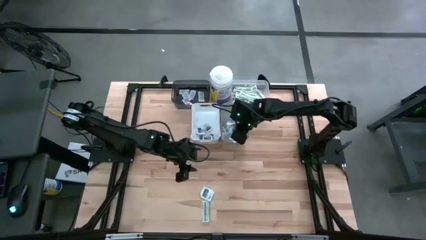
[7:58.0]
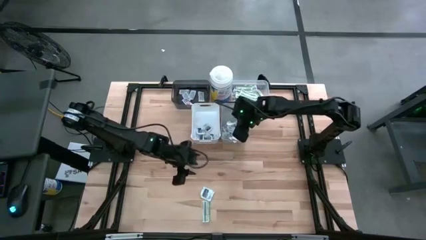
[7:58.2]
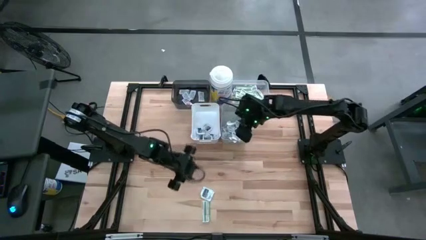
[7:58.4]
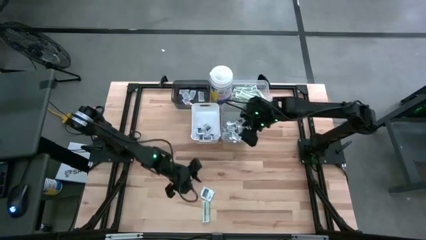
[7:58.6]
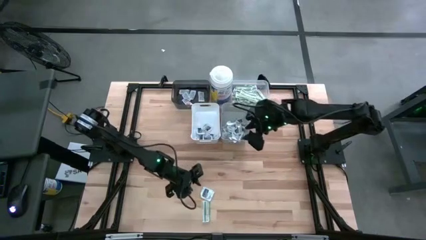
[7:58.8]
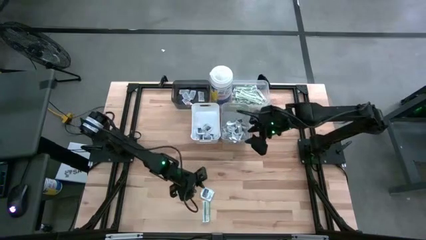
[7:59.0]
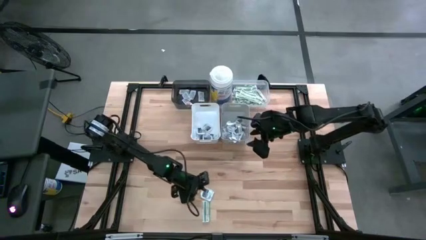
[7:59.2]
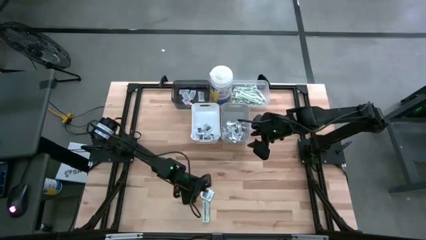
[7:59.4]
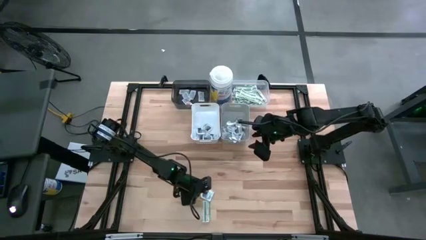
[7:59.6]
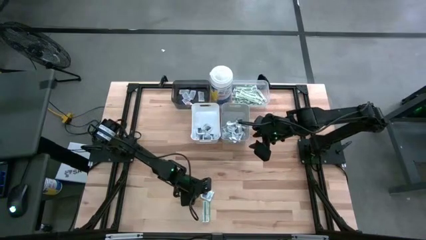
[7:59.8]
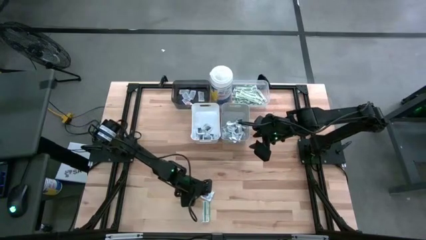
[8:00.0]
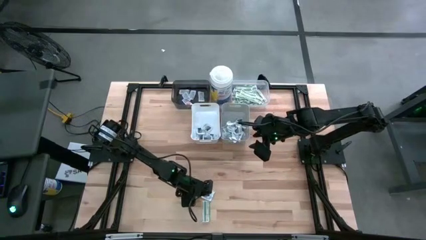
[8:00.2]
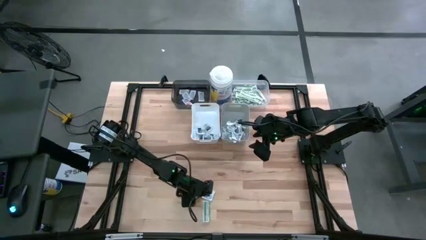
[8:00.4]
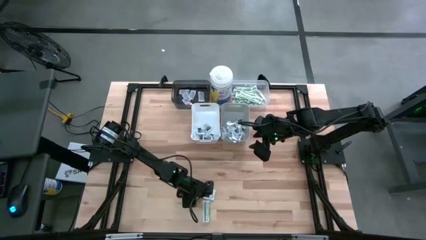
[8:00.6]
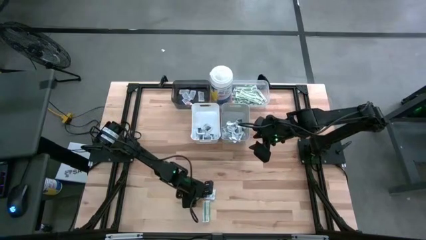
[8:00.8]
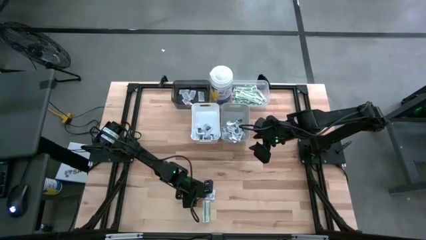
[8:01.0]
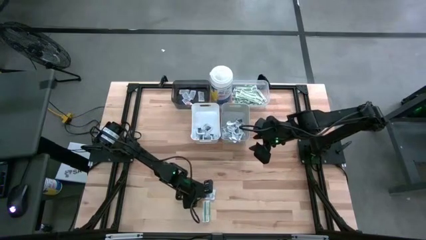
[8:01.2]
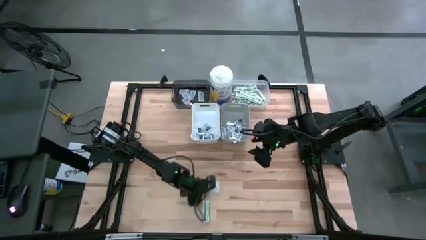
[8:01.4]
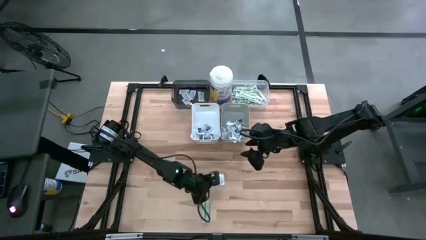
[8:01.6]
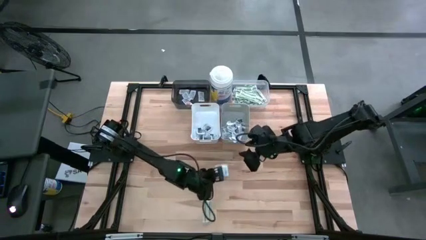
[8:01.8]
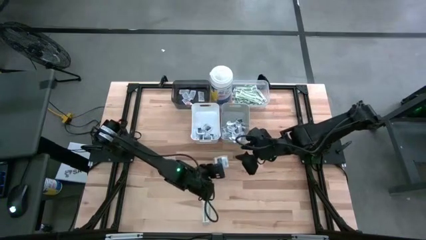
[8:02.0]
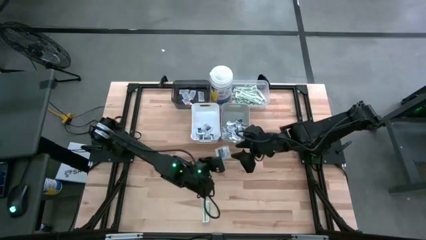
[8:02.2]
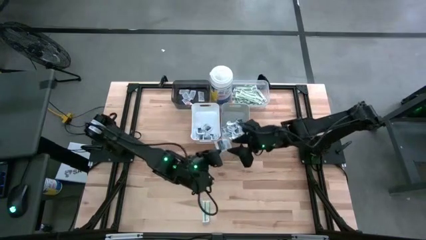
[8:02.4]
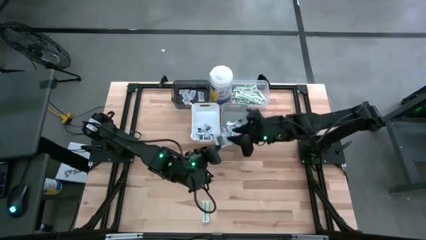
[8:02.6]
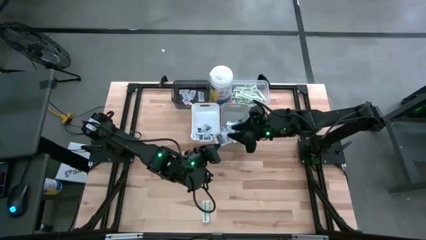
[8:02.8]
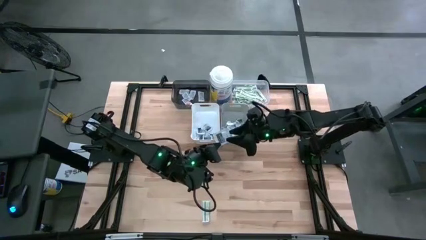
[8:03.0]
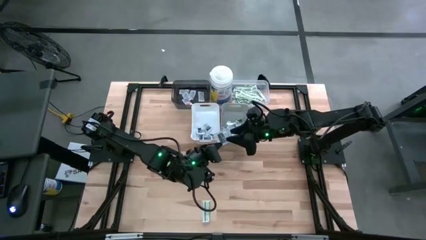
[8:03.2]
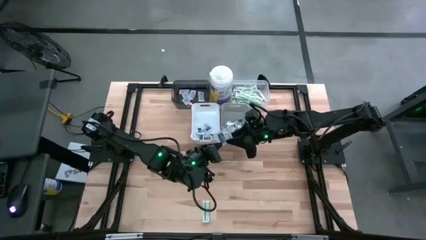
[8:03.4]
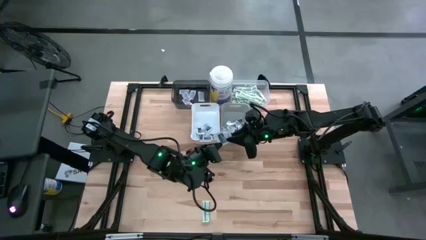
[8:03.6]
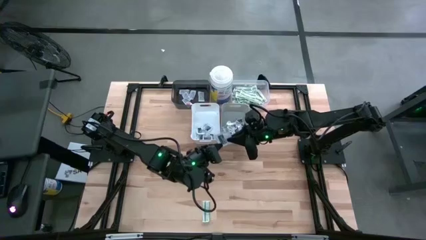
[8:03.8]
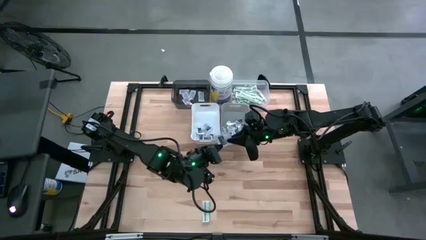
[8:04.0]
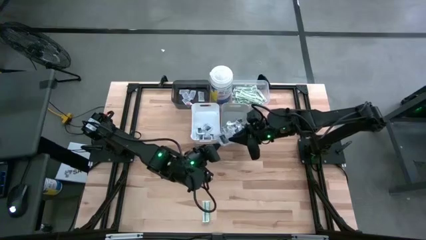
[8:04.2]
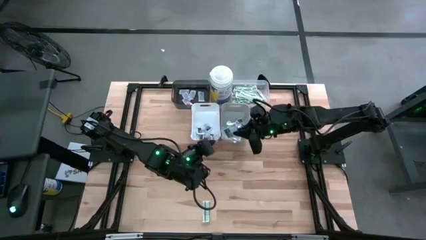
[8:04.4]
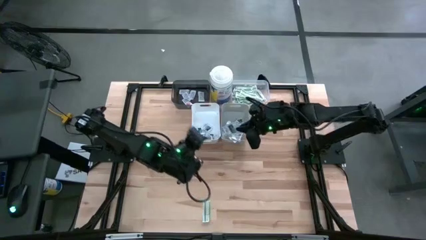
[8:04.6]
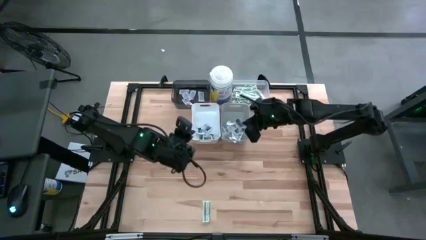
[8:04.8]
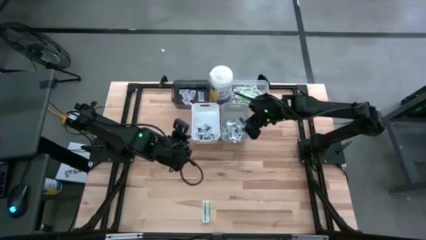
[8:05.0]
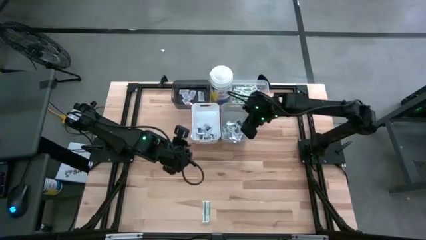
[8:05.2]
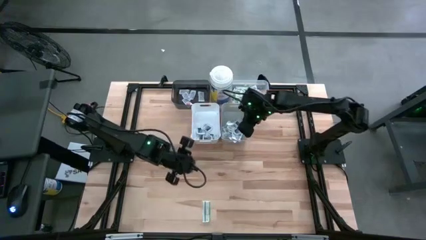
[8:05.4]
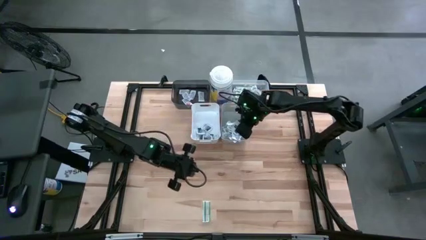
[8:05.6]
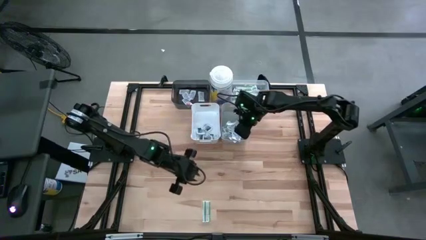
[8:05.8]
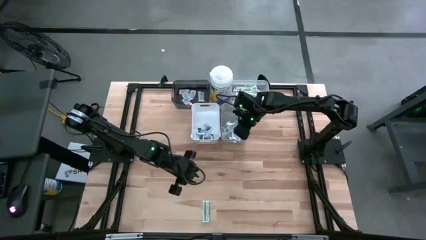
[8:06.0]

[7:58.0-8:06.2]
Task: Pick & Place First Aid Supplies
Put the wipe into the gray bin

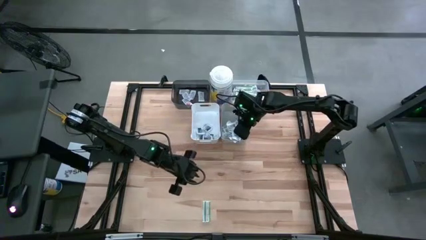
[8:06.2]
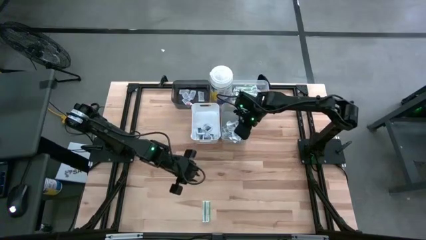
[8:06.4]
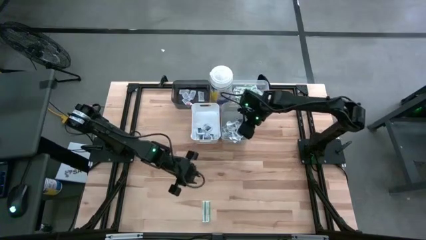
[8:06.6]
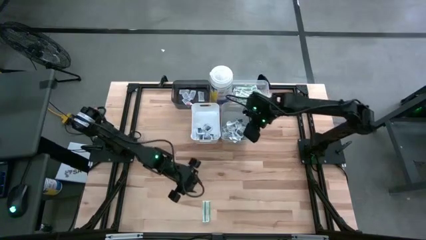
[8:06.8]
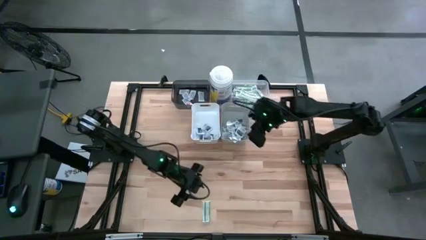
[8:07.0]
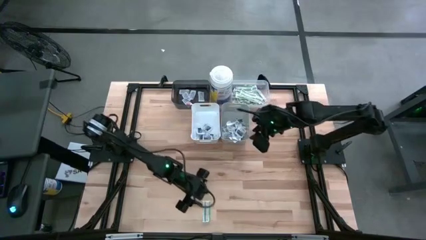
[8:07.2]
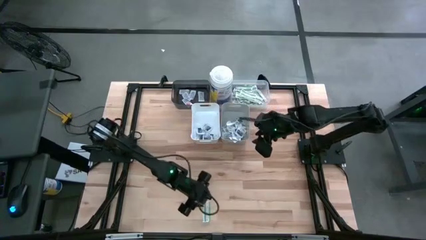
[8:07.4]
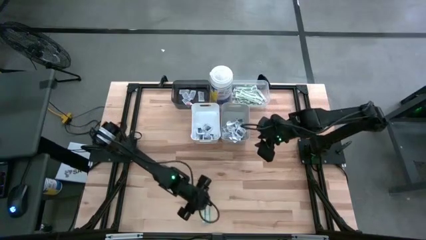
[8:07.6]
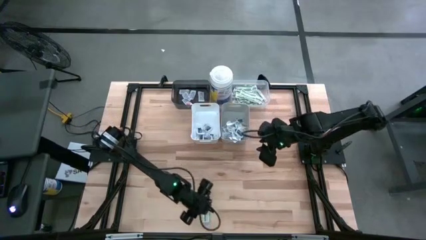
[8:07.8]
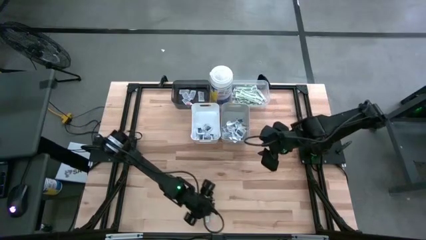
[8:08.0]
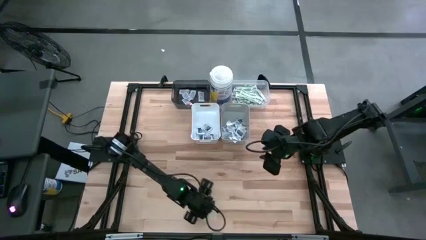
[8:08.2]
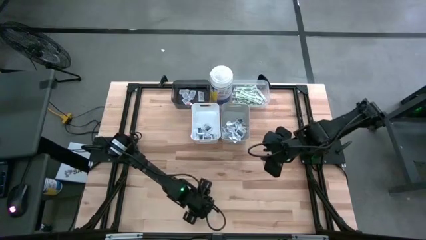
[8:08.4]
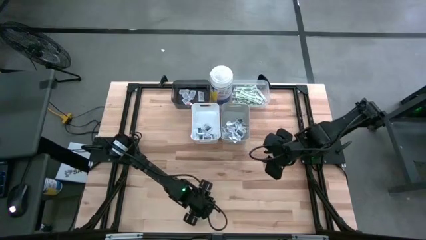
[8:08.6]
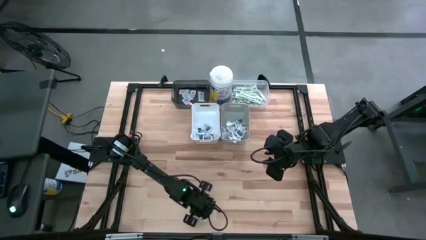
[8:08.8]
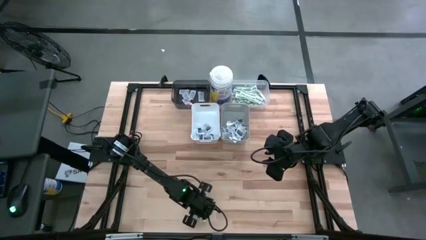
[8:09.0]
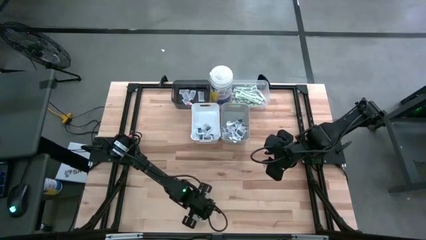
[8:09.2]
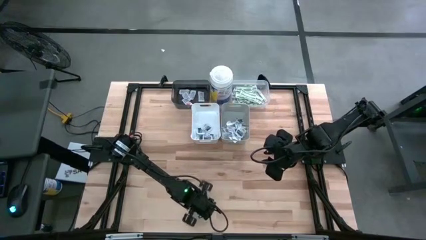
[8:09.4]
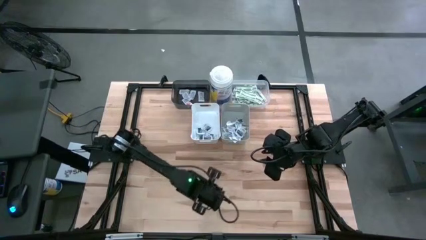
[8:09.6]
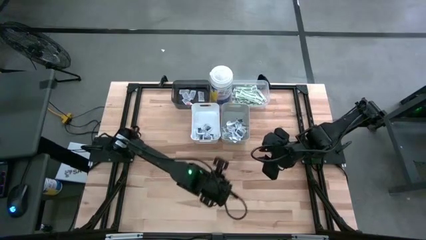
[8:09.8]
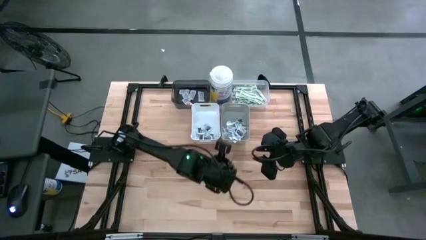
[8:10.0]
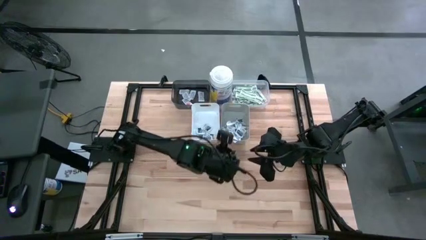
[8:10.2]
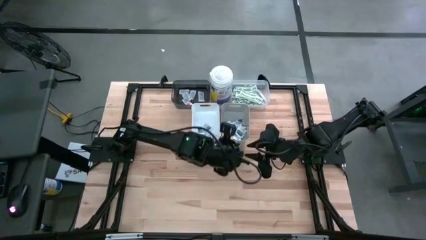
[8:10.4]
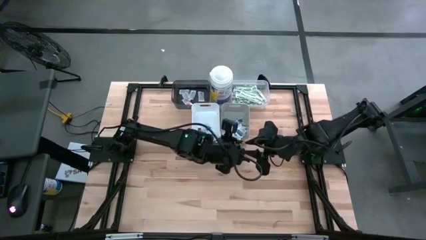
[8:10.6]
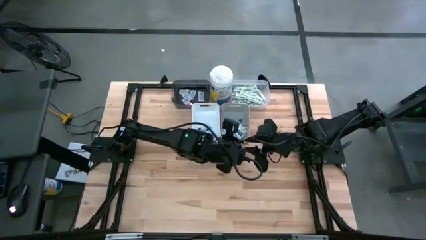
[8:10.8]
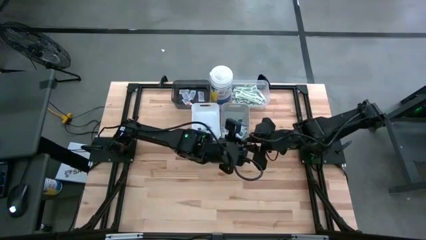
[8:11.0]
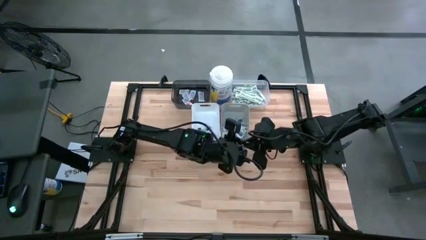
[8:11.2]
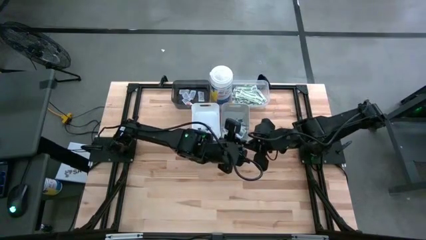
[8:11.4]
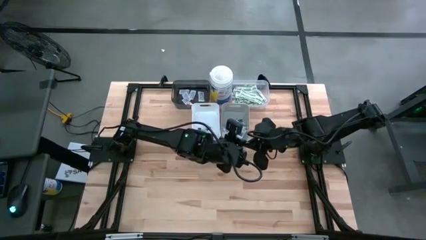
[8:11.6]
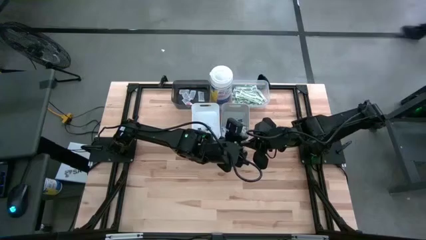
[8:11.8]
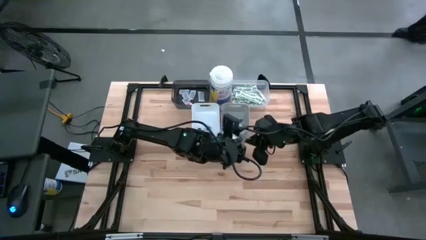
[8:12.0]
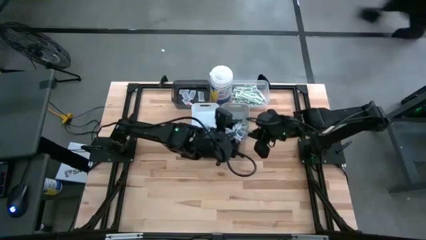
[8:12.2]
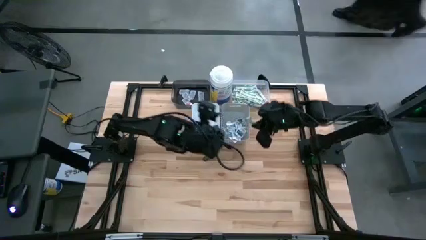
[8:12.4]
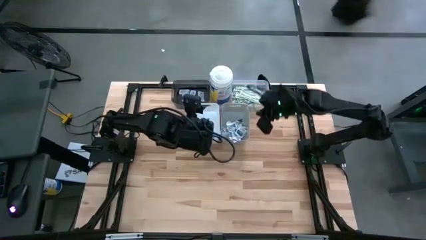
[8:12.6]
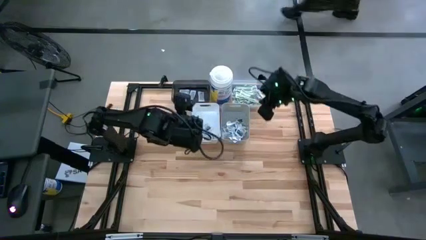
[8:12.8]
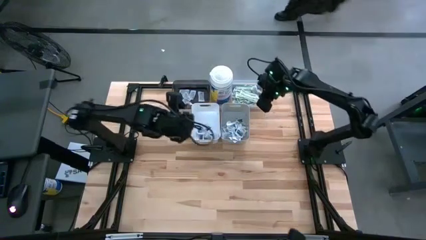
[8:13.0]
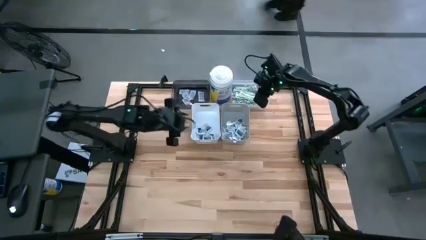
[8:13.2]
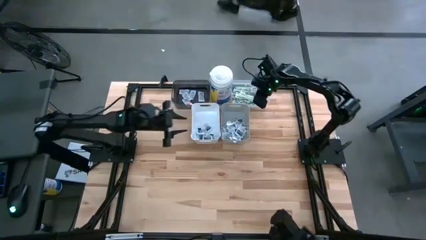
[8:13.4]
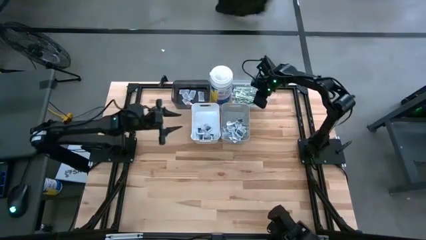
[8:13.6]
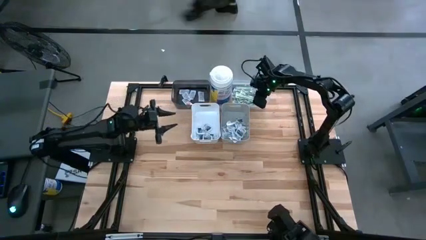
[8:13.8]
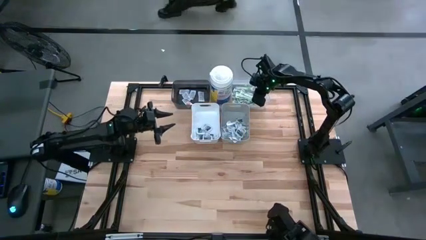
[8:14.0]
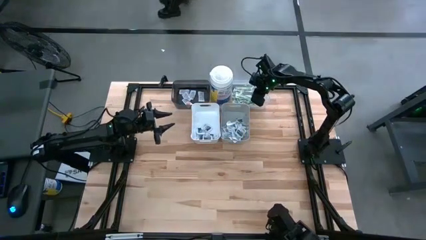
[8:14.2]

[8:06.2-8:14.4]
Put the band aid into the transparent bin

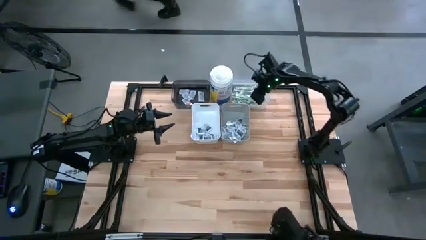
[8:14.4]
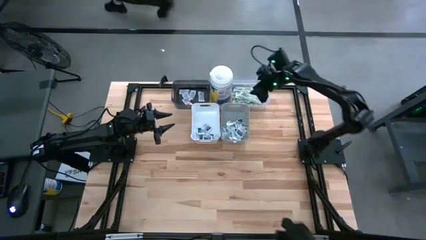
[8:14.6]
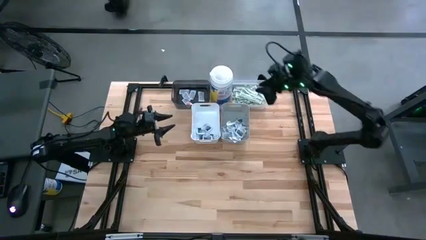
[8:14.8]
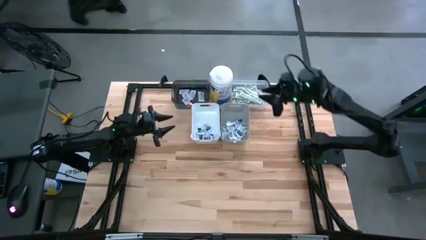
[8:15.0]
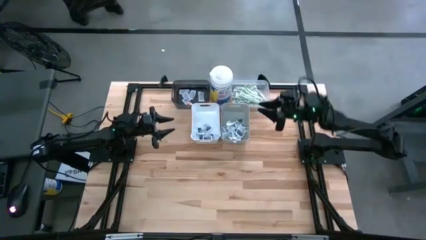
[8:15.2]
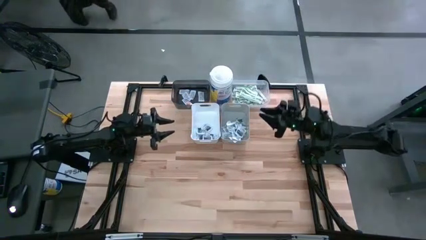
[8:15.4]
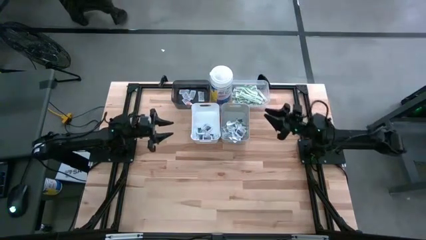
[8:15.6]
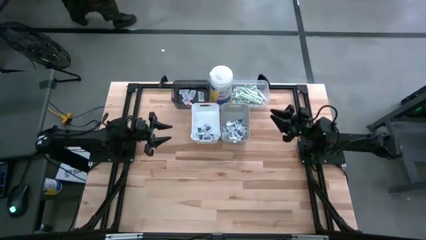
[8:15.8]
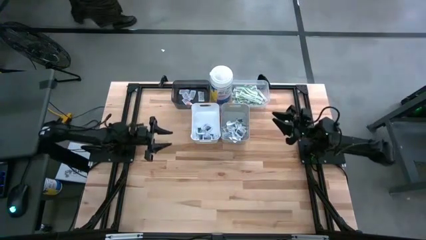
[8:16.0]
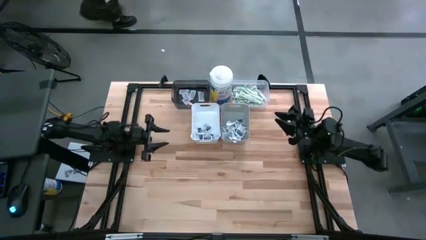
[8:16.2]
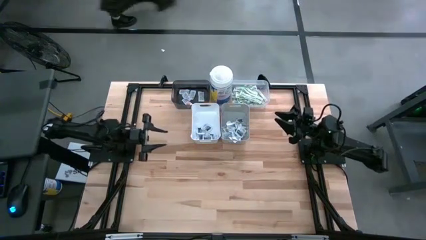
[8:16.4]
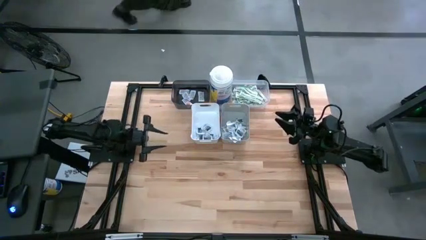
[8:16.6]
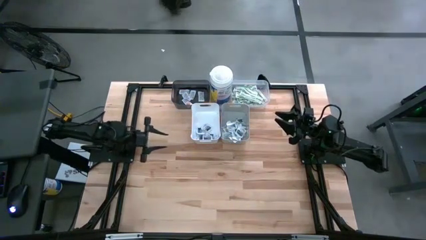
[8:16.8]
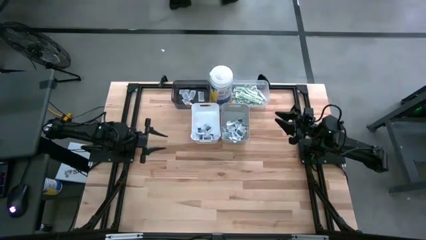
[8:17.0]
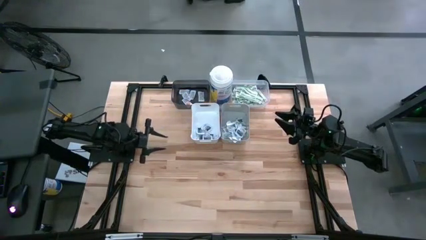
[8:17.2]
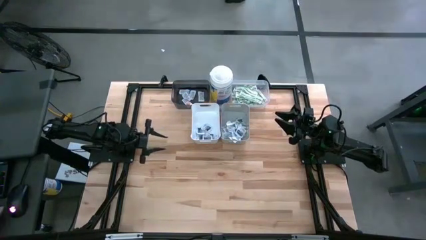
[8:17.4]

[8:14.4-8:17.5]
Return to home position
